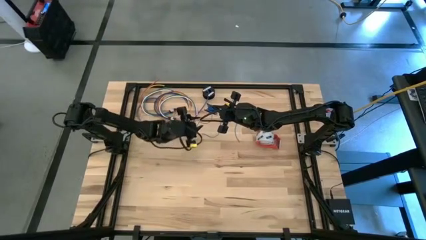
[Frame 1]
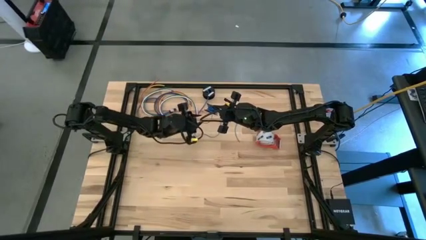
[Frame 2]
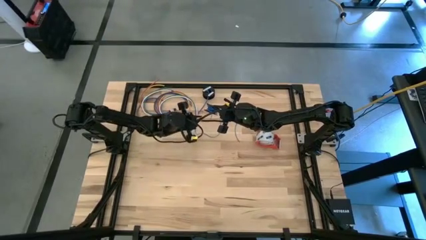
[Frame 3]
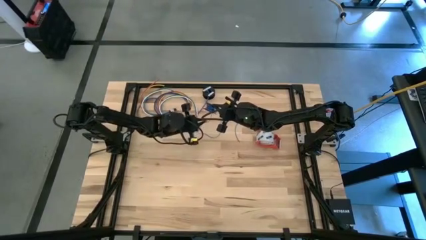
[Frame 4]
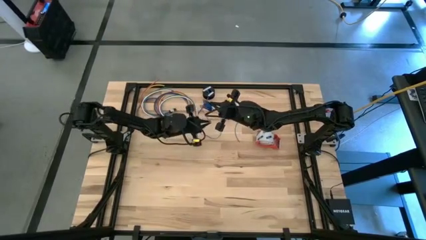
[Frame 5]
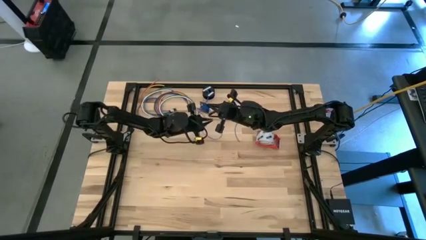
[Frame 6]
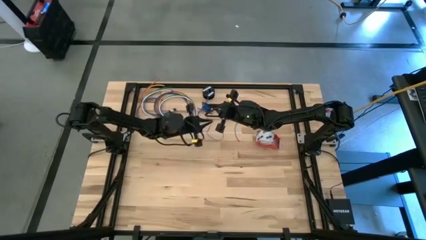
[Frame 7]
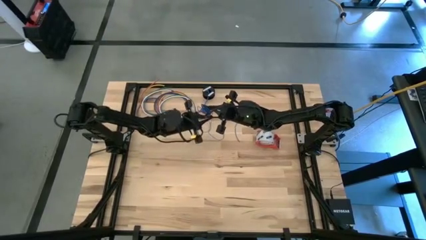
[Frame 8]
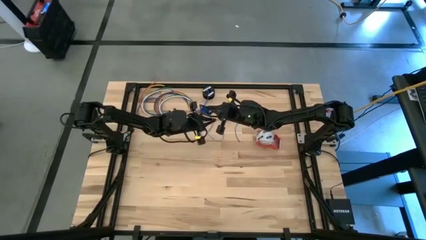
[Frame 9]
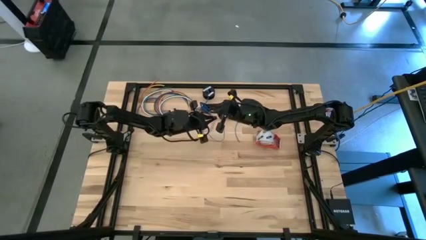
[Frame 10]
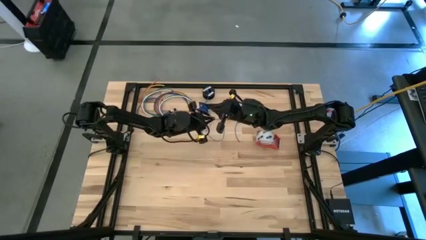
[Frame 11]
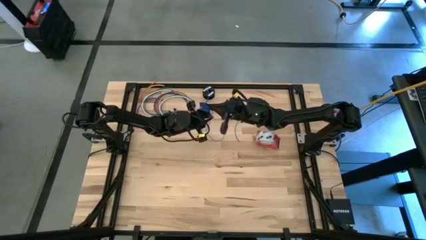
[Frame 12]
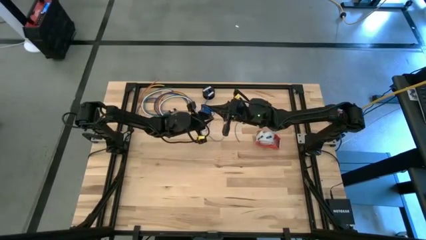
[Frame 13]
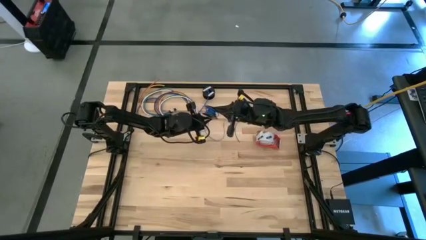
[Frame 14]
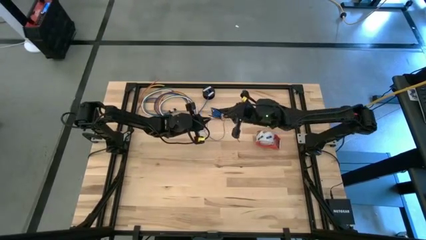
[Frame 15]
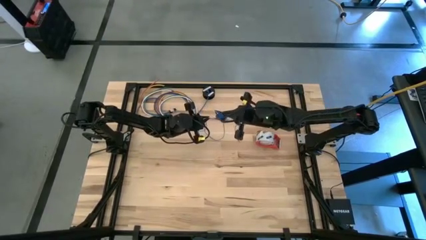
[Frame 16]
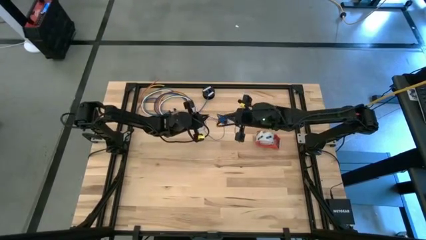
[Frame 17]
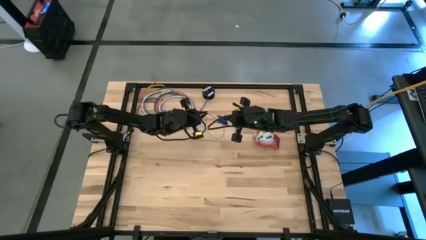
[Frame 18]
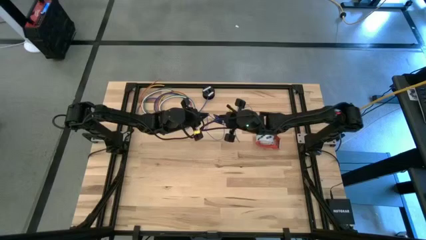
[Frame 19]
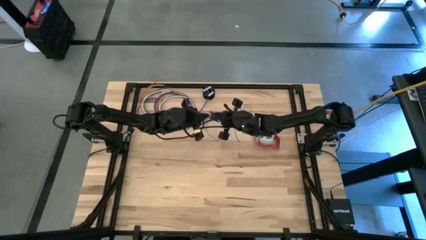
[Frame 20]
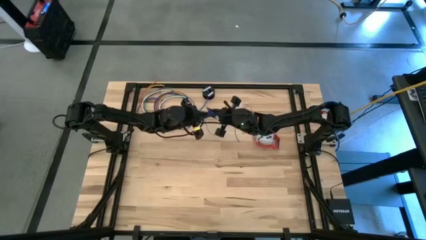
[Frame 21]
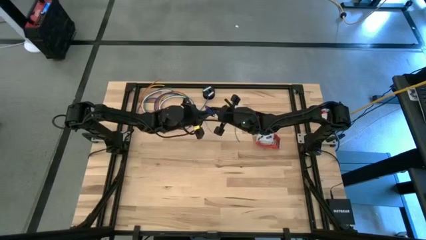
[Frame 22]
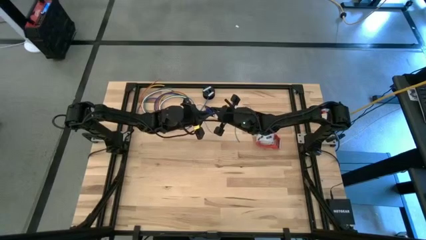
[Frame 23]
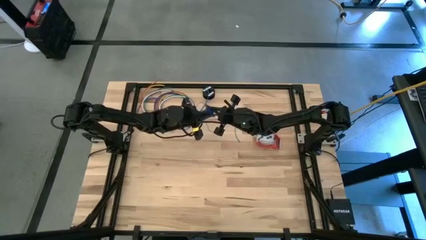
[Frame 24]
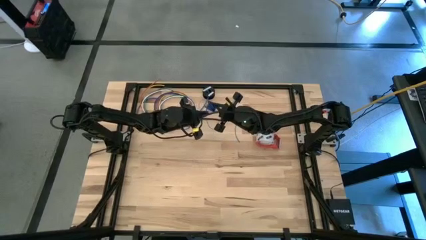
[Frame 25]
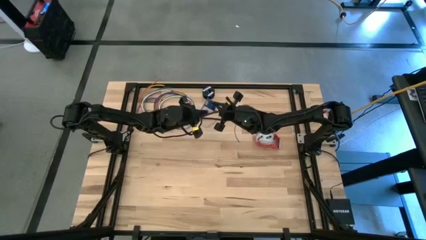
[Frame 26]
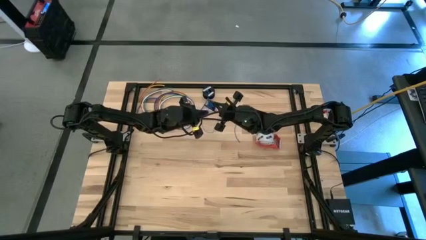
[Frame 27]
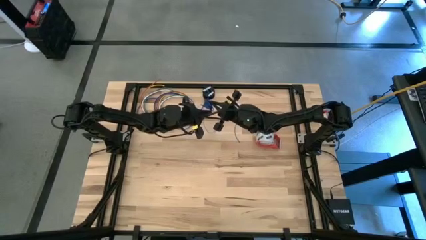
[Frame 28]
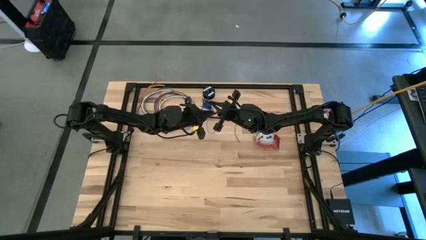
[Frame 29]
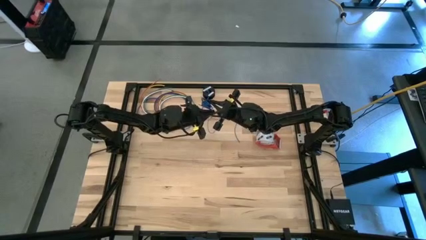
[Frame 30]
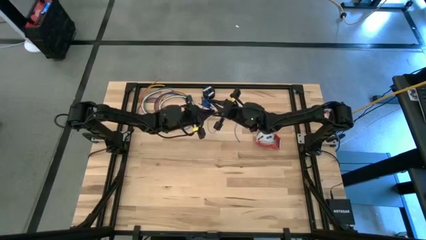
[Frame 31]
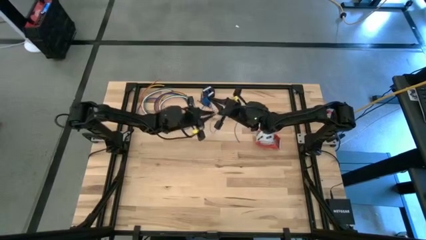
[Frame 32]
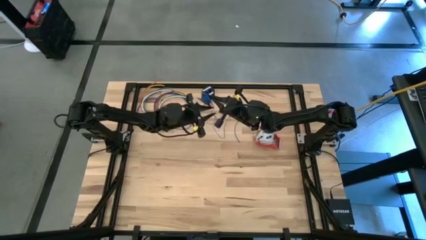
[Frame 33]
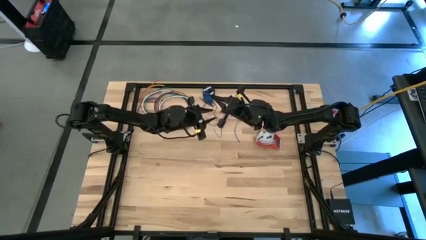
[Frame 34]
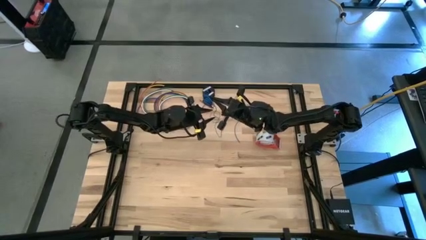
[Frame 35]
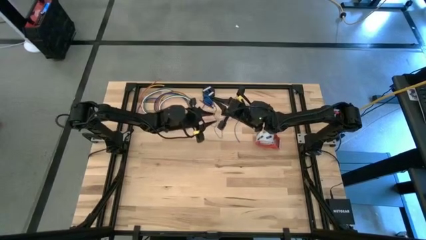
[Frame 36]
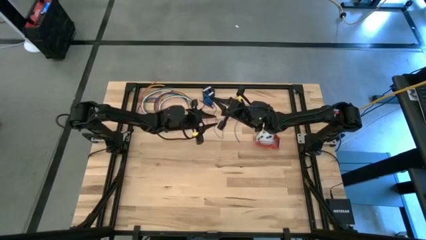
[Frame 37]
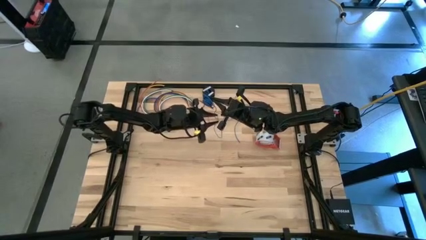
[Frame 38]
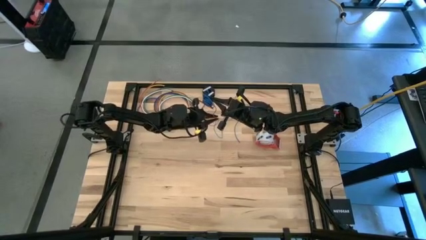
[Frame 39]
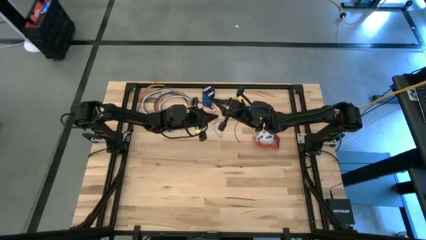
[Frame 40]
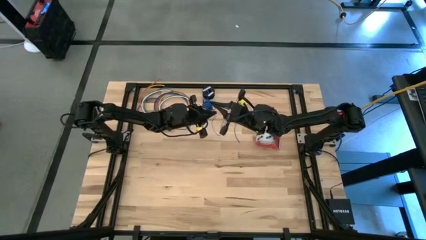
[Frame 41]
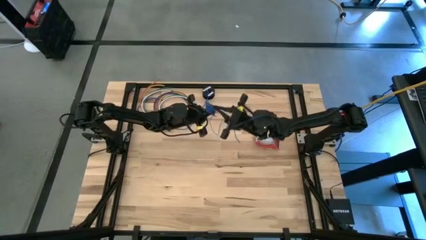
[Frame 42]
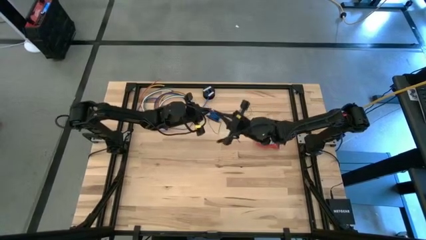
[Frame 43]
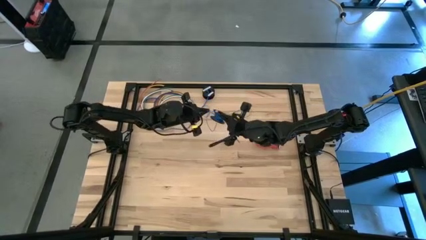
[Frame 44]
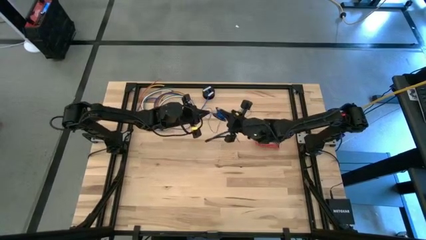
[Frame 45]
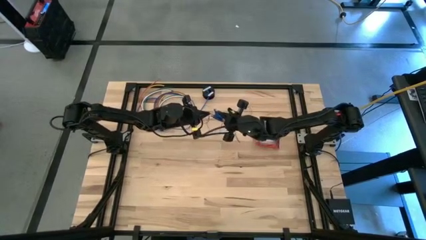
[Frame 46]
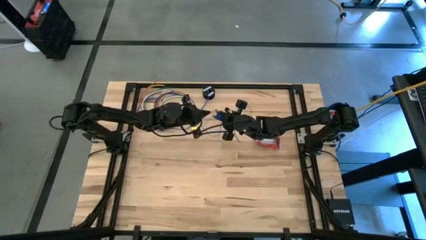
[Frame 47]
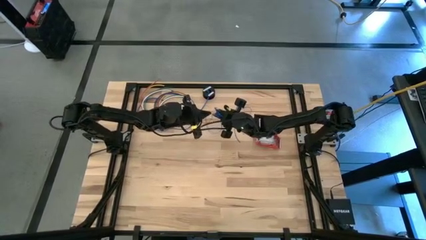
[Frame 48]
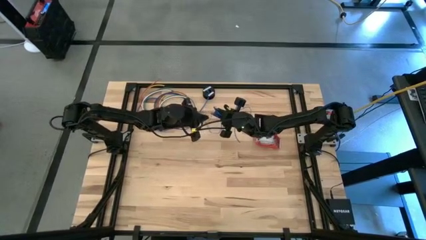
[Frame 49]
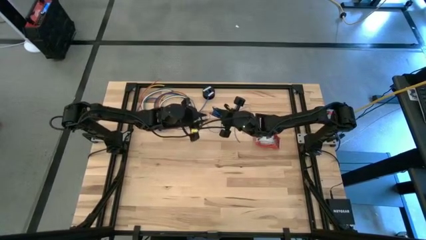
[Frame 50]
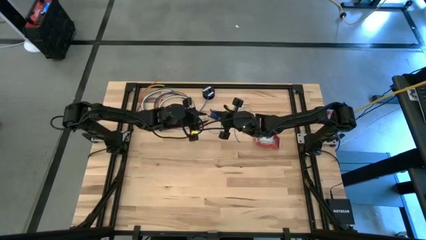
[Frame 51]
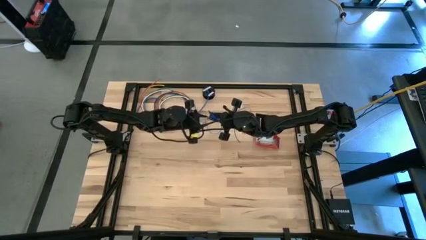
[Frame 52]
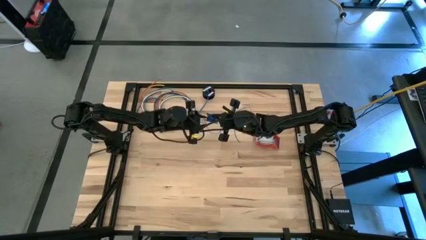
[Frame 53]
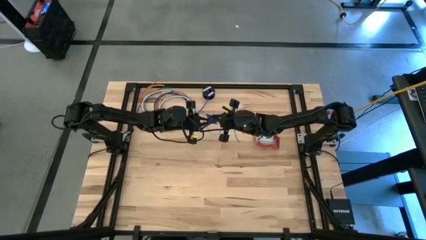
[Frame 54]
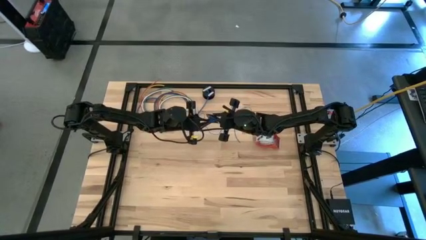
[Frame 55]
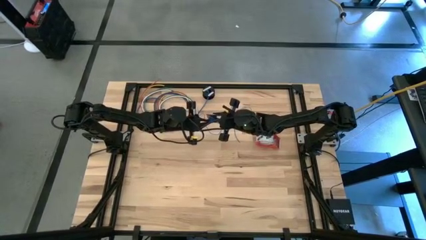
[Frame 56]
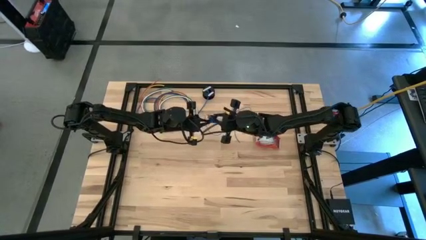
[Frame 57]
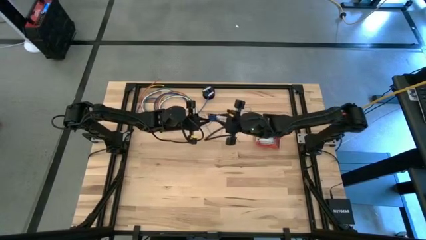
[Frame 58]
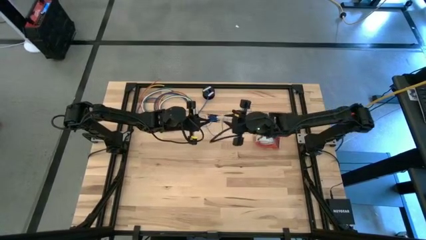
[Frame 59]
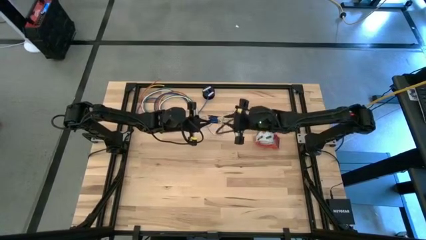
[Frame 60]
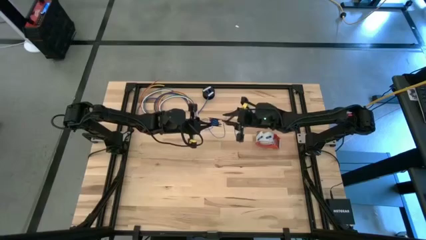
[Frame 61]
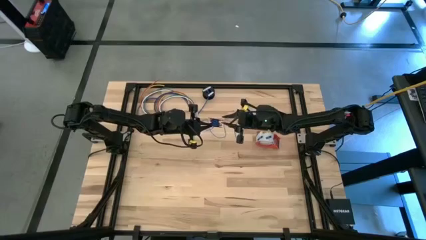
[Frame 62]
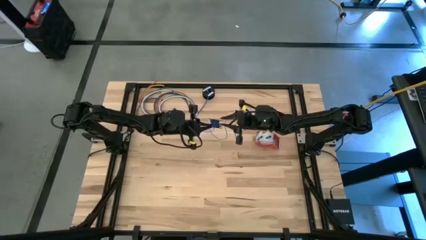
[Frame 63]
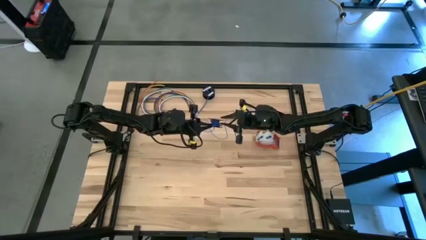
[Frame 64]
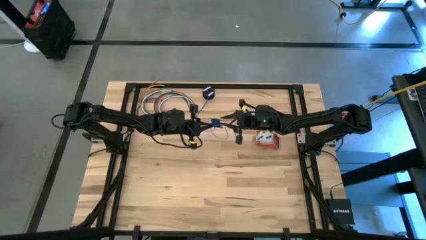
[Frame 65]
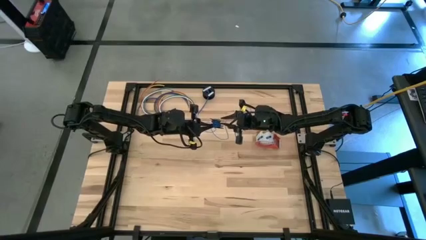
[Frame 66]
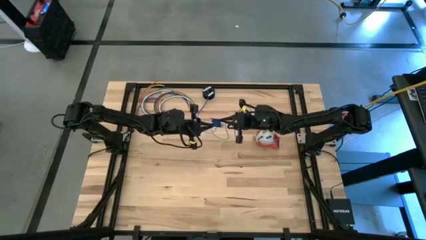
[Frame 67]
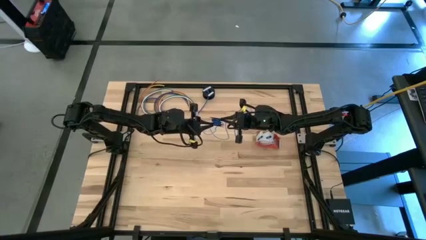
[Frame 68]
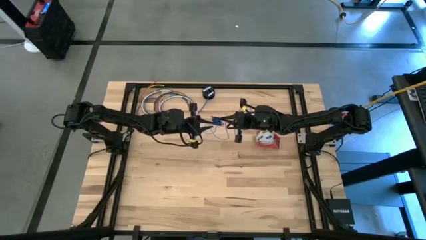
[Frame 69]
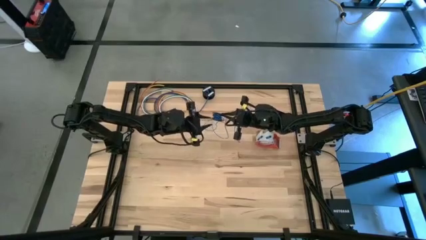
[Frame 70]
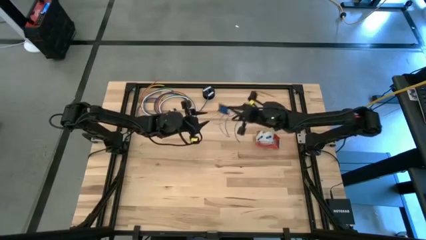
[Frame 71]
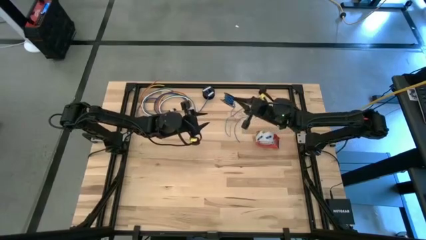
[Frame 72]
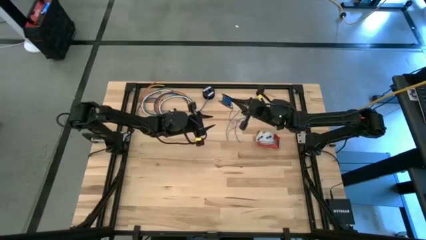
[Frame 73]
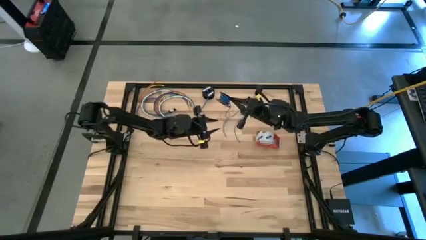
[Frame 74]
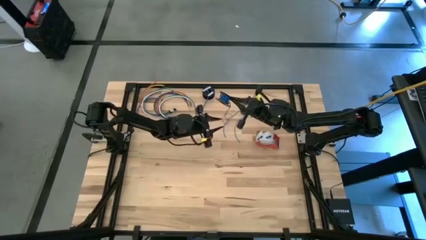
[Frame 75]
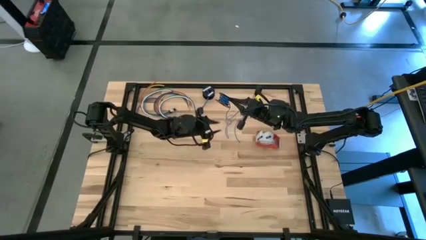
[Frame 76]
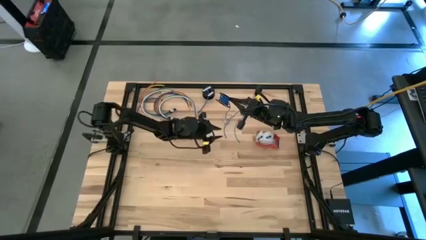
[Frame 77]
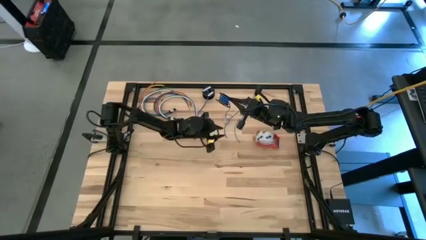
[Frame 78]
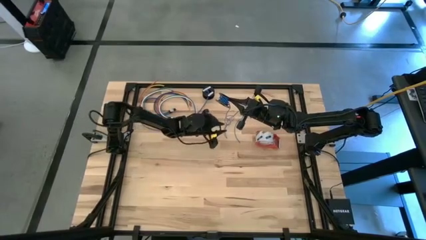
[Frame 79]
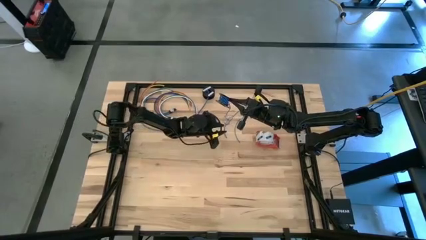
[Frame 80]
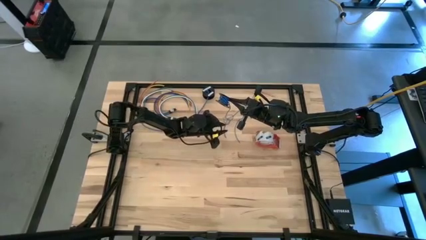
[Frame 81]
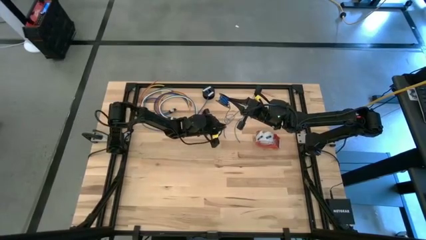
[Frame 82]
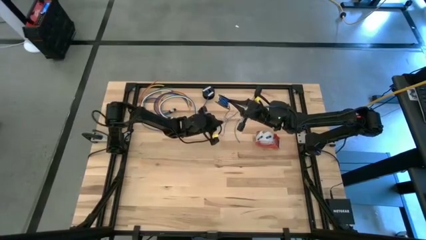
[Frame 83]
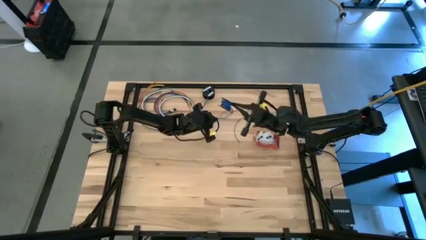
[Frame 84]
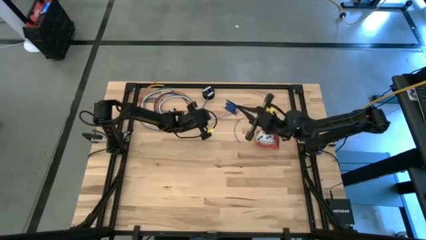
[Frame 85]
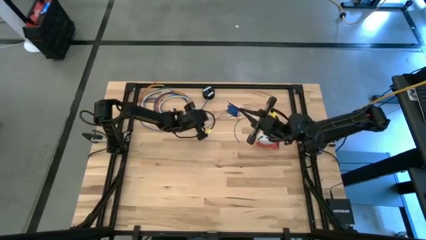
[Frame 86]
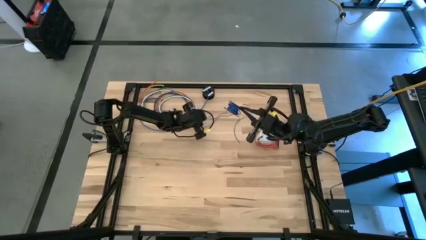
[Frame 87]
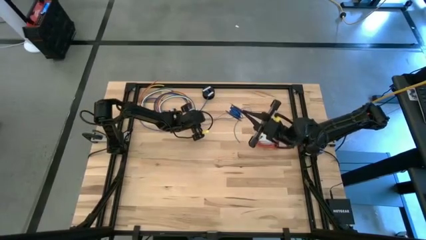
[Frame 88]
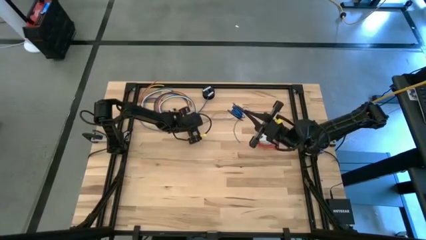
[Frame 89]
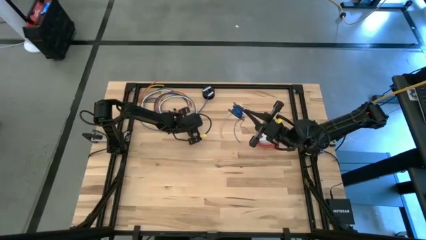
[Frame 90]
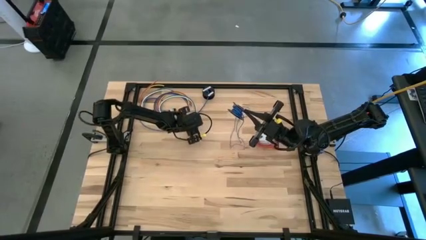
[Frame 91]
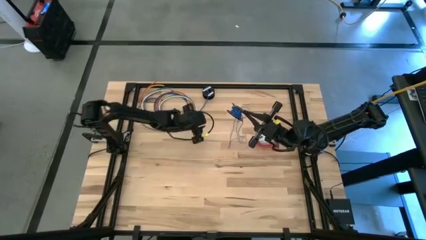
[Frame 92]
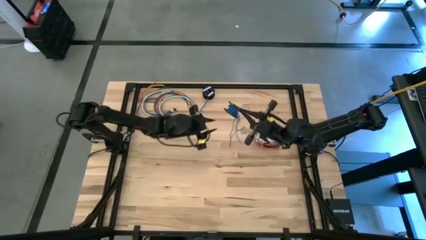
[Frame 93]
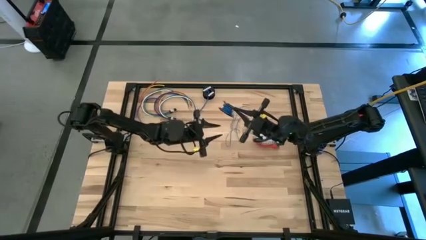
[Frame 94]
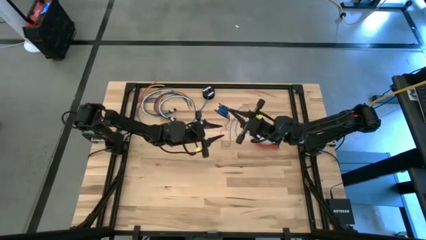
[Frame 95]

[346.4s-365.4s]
Task: Coil cords
Coil the blue wire onto the spool
